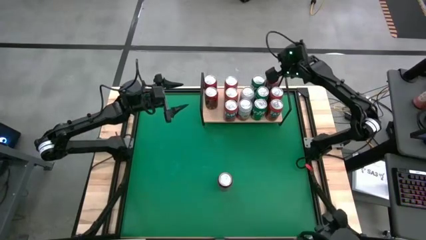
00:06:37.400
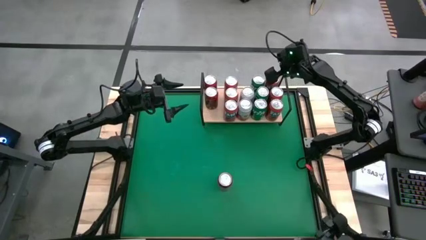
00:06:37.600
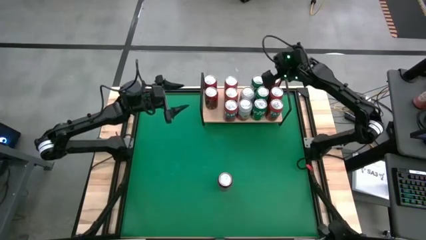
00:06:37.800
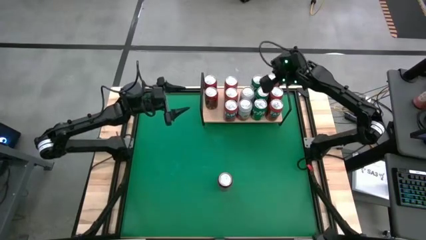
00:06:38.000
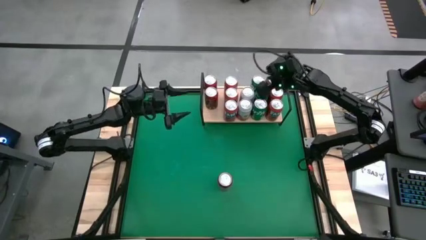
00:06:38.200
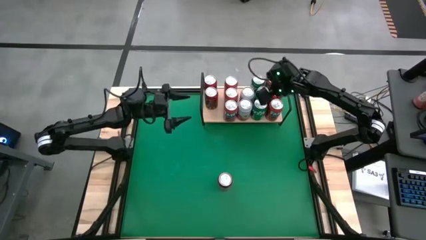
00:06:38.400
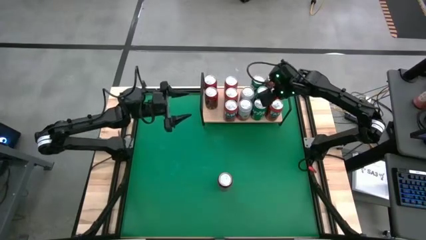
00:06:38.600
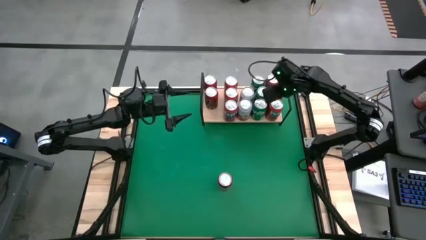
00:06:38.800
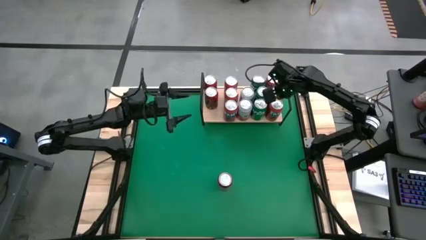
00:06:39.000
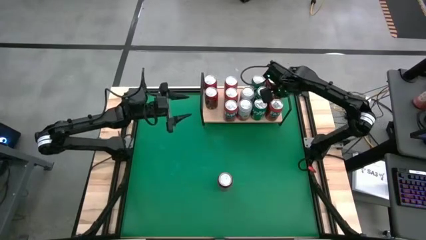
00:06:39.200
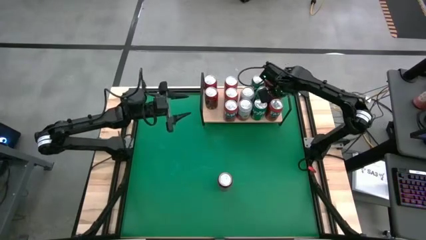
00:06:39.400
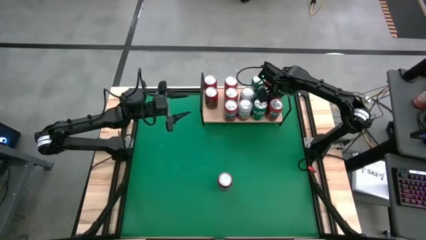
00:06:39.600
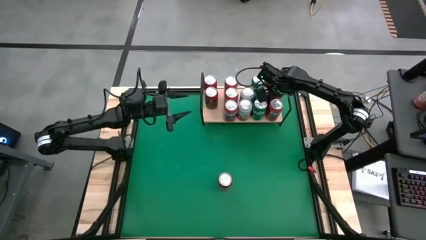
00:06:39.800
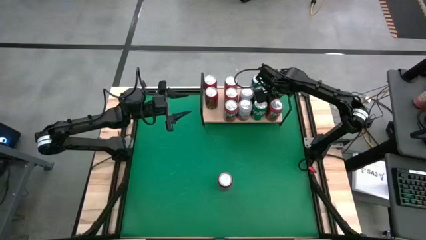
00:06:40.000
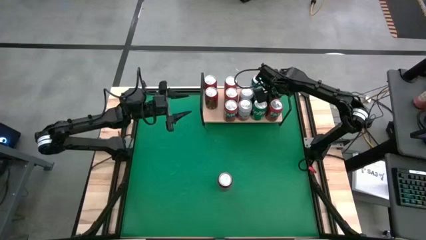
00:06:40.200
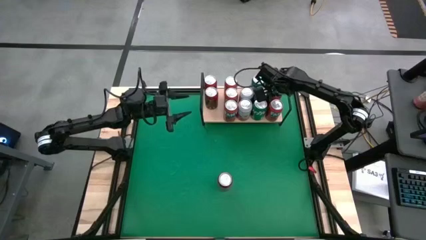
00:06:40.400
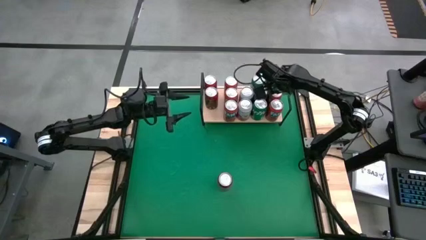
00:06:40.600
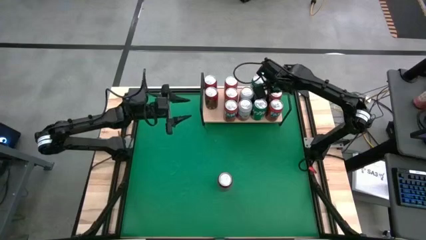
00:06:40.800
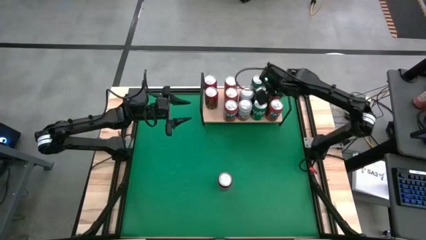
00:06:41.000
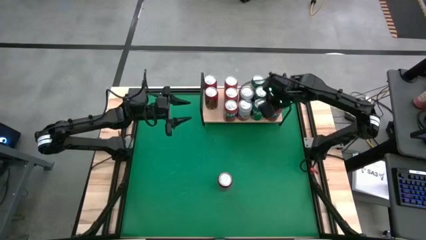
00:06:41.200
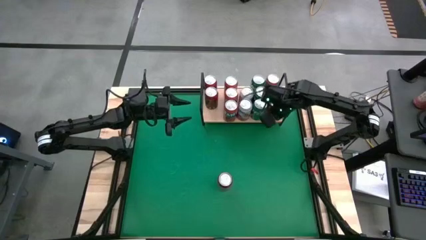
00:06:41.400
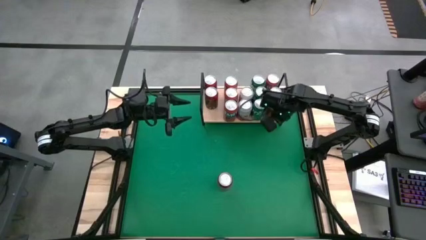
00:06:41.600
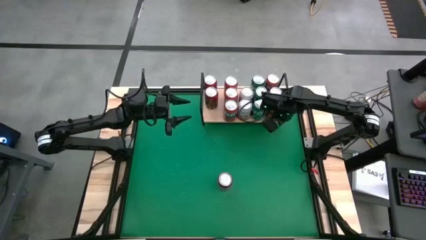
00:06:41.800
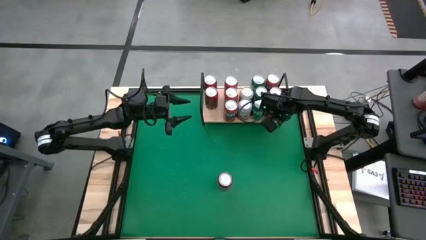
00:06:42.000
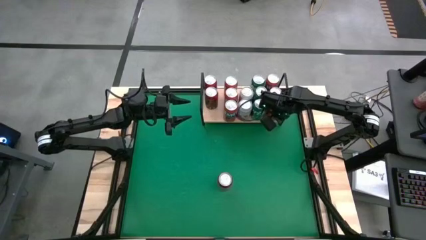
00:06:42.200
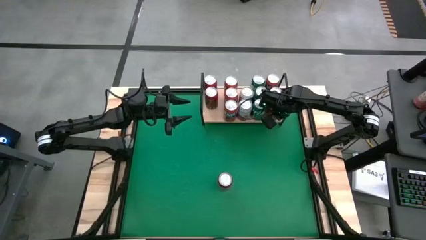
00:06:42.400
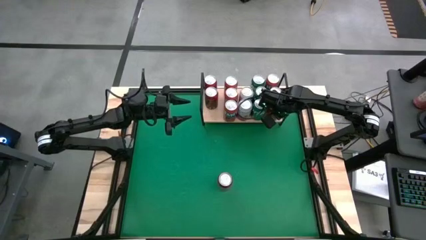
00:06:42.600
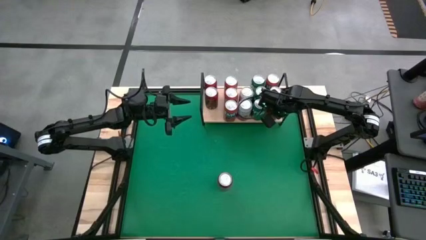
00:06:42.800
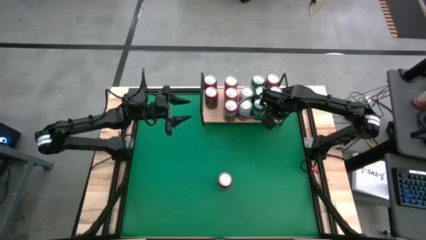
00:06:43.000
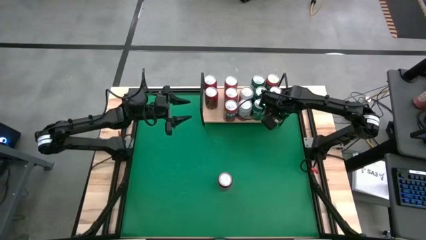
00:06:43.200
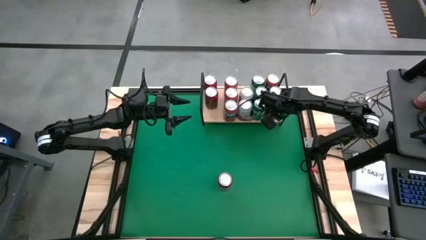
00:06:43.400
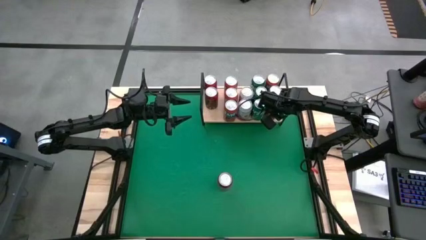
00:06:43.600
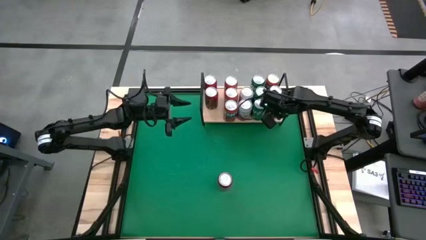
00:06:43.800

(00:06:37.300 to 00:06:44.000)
Task: Place canned beverage on shelf
Adjust the red soda cans on the shelf

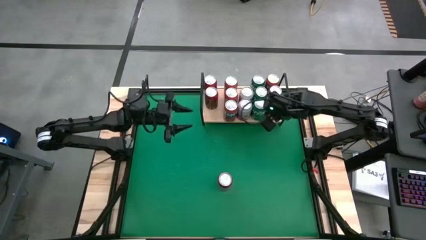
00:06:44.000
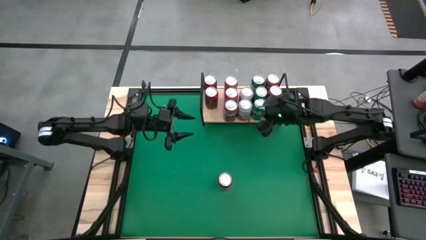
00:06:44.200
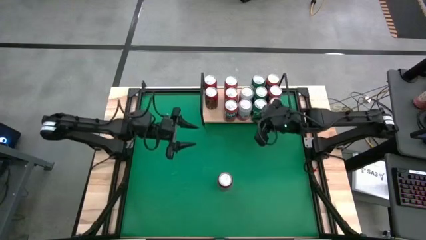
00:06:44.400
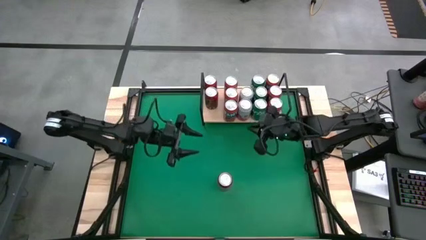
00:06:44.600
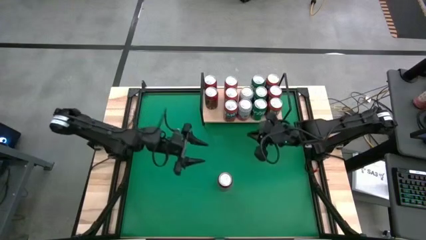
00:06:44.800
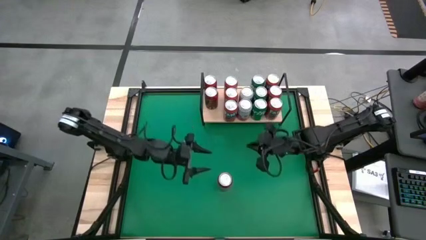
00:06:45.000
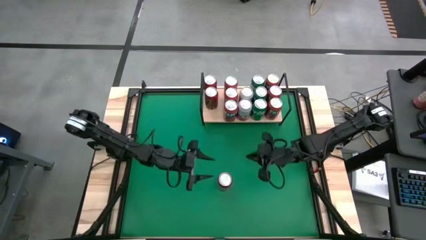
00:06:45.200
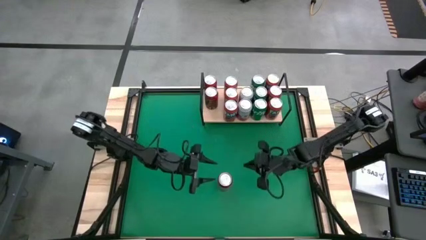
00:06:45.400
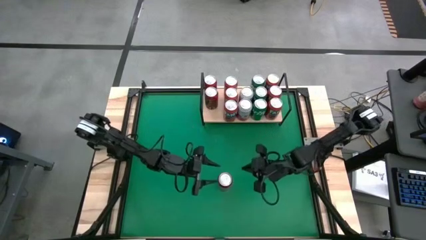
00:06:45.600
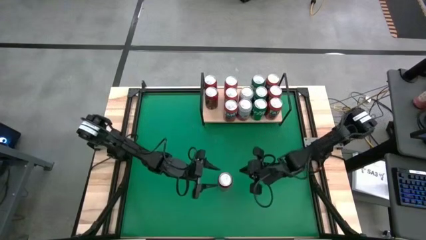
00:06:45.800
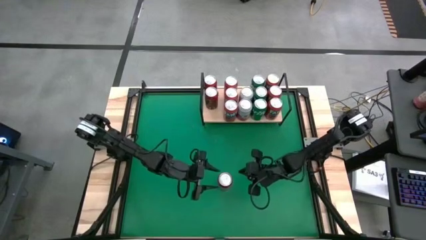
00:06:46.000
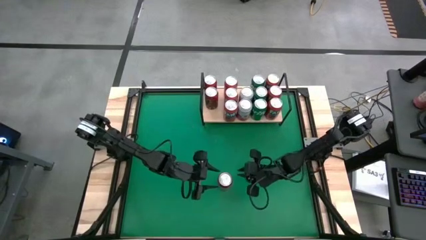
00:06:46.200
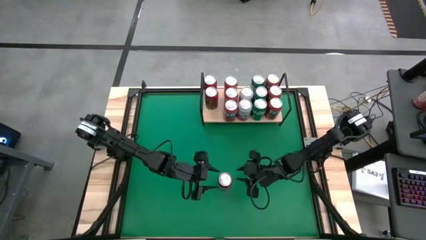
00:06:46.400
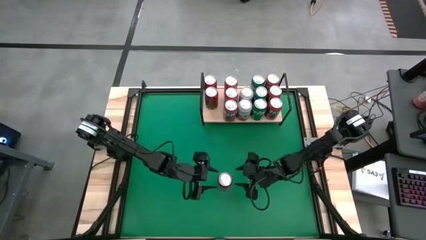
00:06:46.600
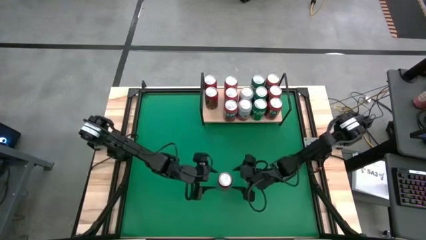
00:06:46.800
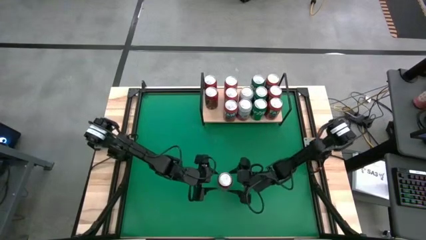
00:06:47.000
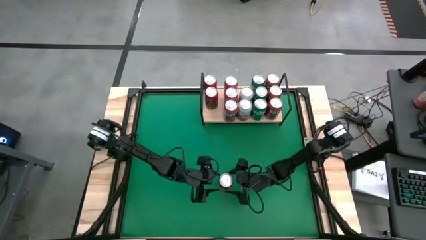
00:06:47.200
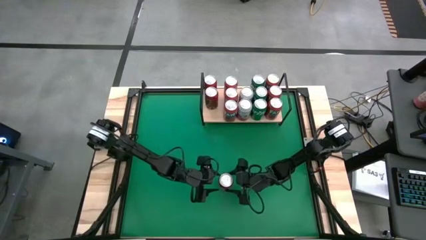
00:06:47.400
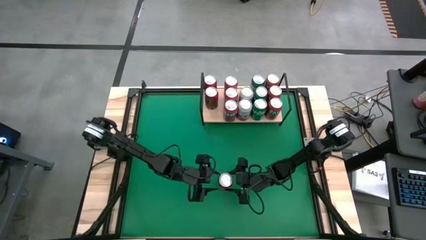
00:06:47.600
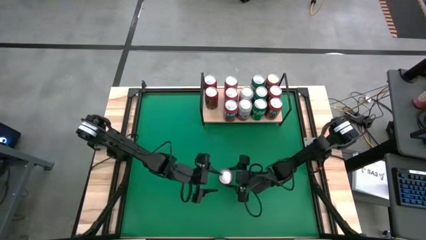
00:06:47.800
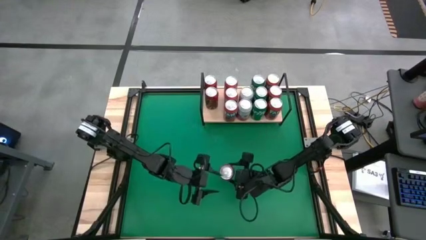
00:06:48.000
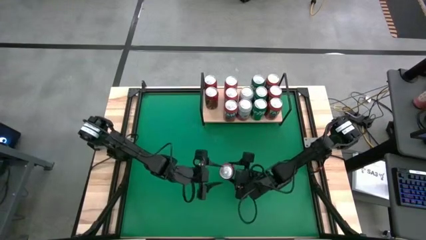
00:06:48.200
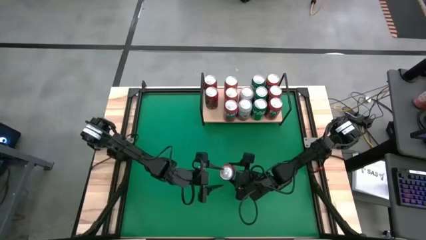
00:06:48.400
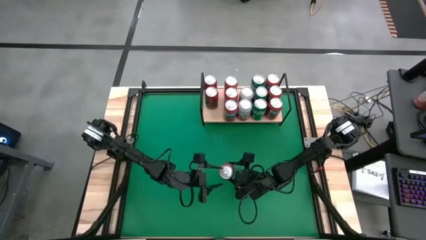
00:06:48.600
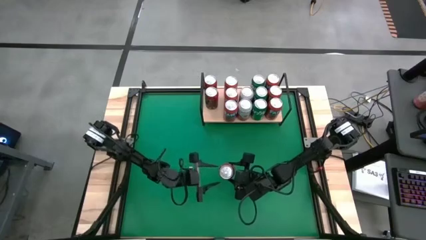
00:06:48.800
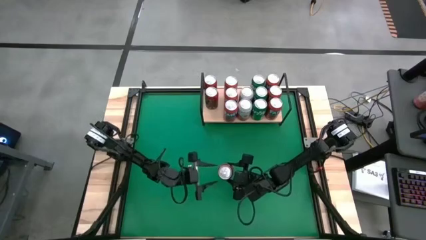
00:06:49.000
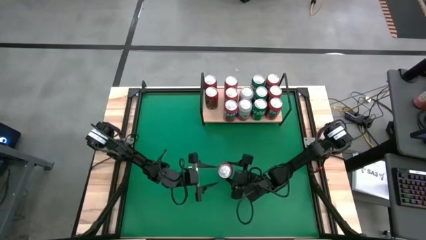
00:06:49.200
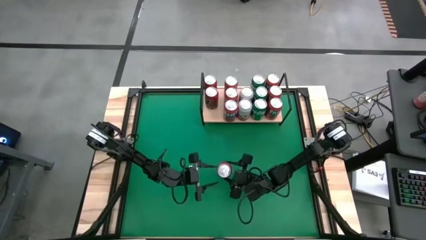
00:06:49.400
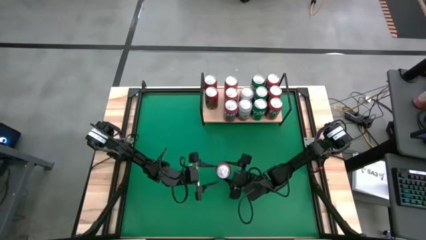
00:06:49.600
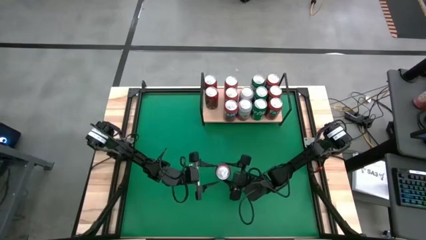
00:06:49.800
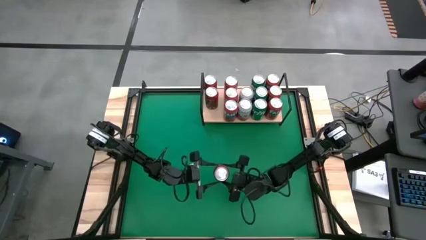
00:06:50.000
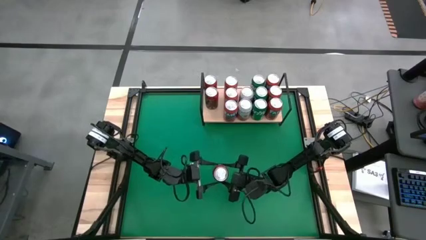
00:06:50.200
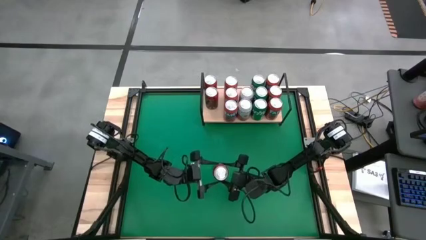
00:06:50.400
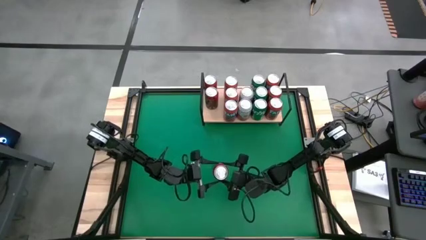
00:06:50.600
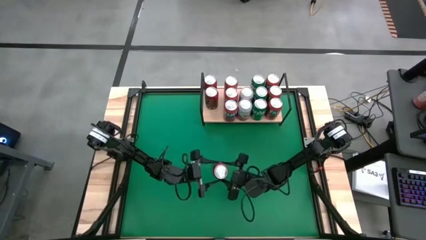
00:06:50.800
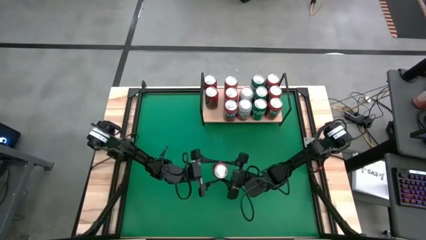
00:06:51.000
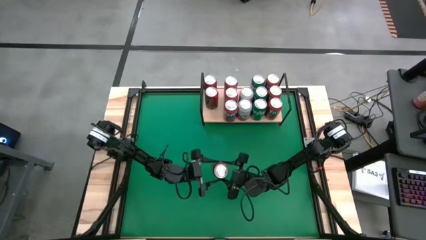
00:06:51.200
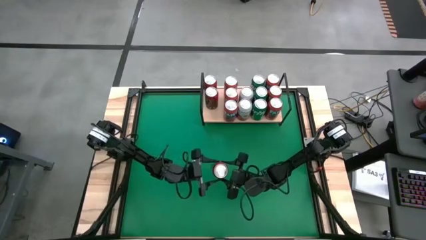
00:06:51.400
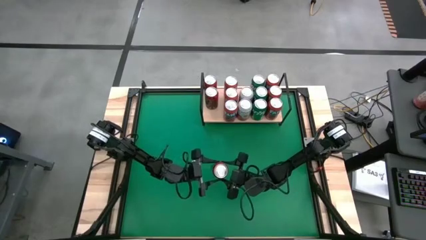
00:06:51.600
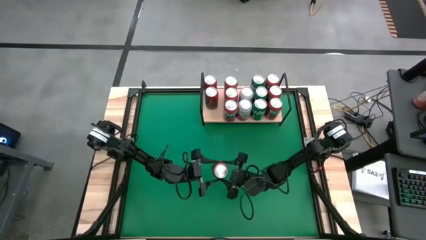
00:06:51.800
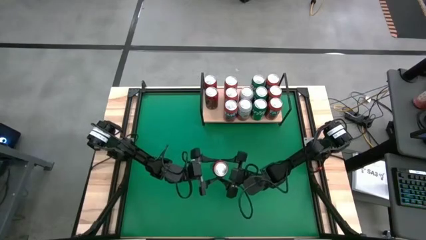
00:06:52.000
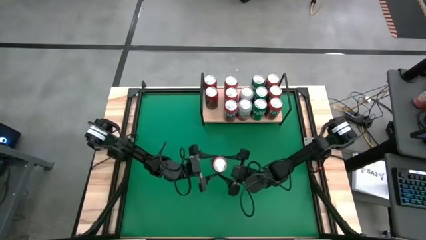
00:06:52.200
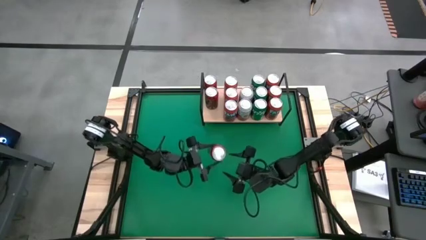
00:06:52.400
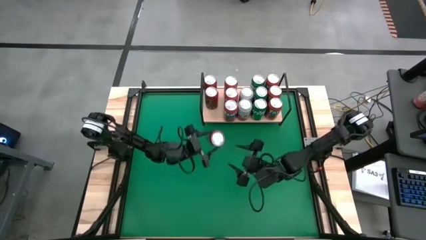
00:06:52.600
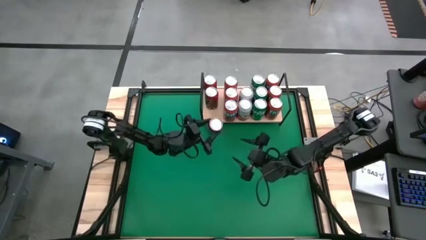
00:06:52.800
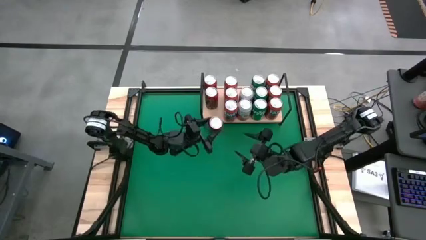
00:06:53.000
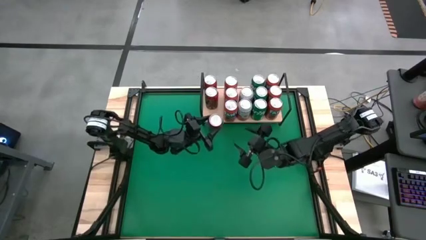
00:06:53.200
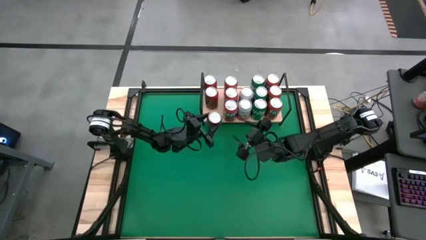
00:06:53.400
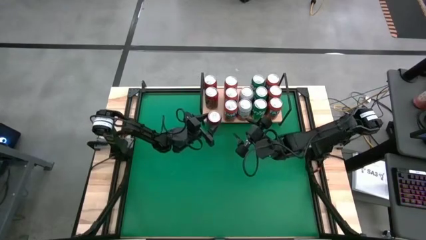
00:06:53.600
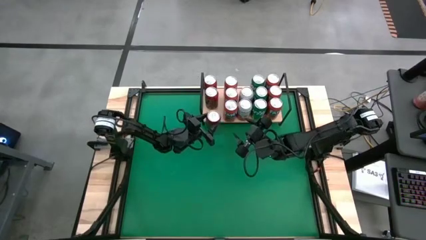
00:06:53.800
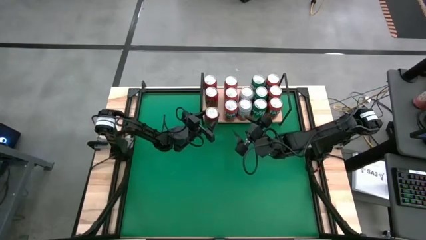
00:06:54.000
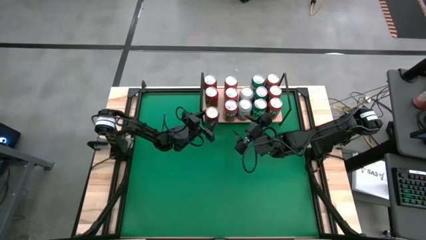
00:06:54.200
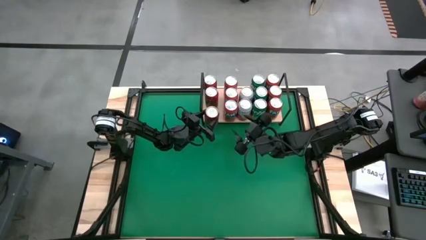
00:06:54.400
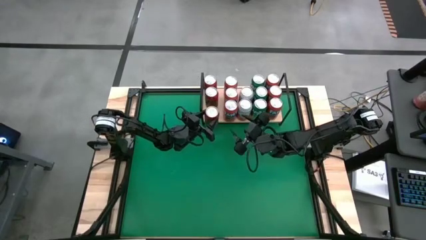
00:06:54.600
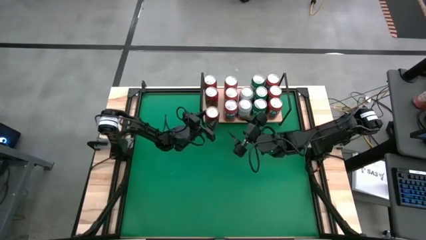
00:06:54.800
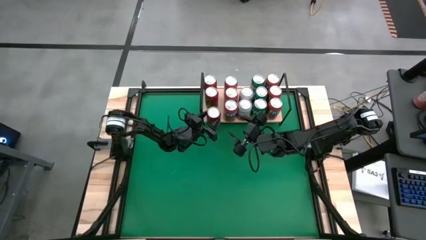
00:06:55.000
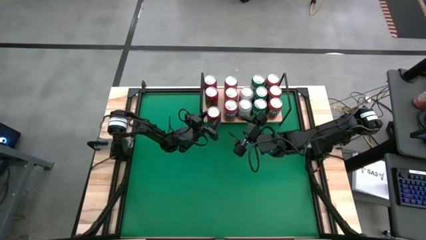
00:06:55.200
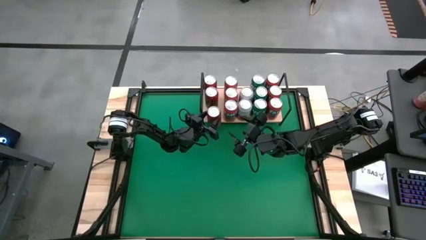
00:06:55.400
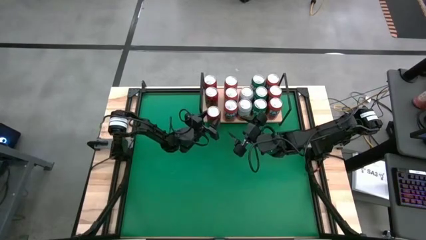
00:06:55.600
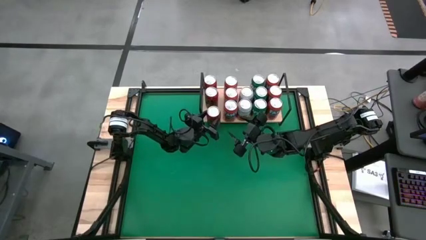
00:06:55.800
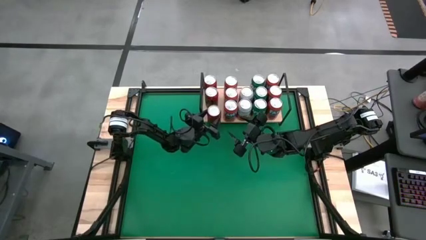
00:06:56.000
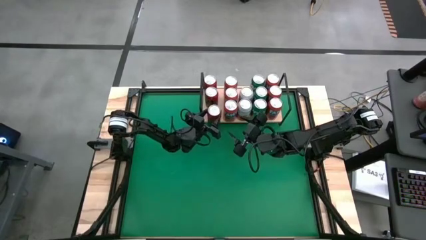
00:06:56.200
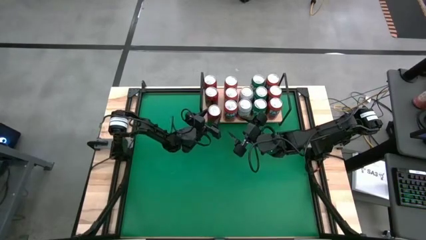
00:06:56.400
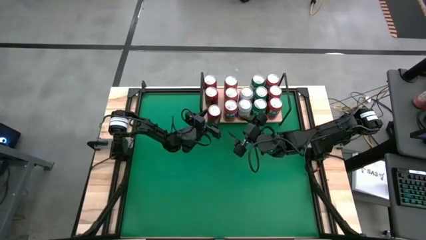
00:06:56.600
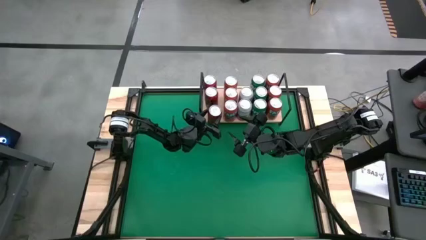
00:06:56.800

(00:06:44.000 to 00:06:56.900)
Put the red-black soda can on the shelf aligned with the other red-black soda can
